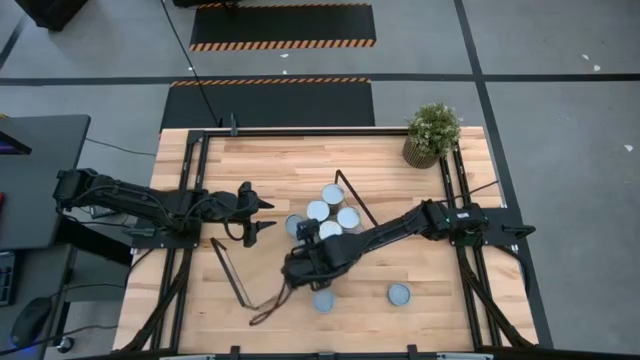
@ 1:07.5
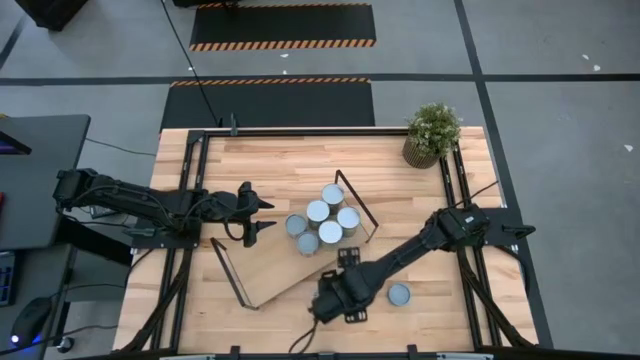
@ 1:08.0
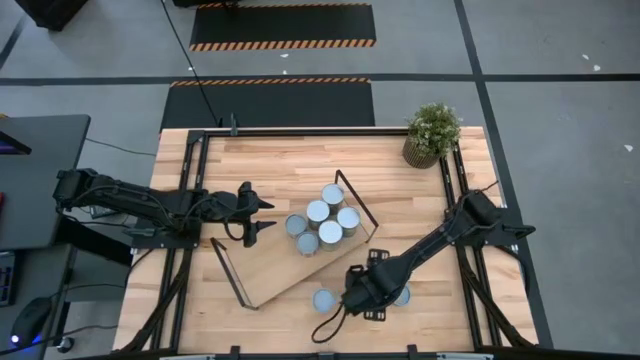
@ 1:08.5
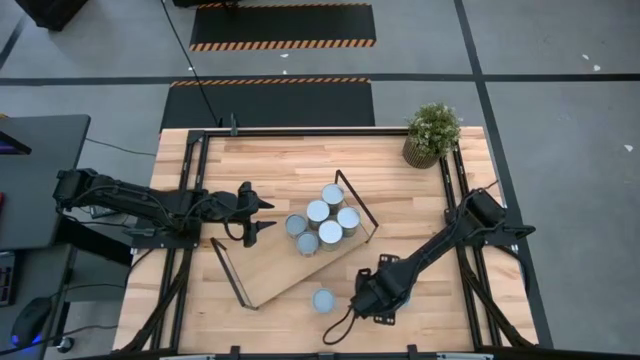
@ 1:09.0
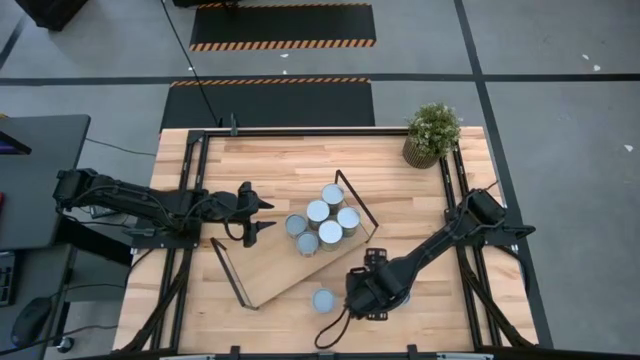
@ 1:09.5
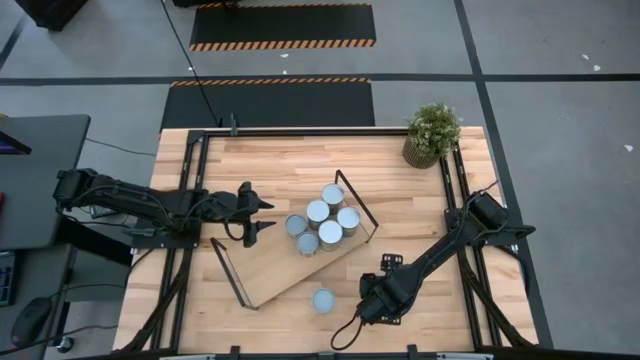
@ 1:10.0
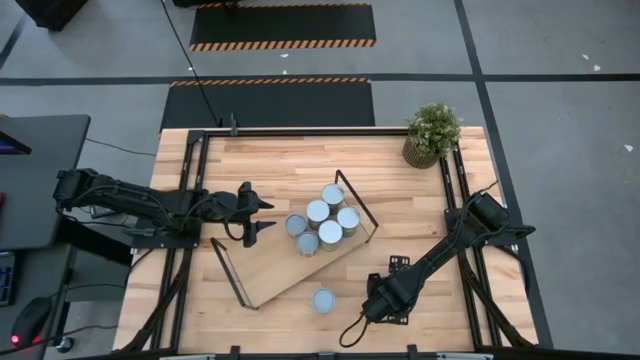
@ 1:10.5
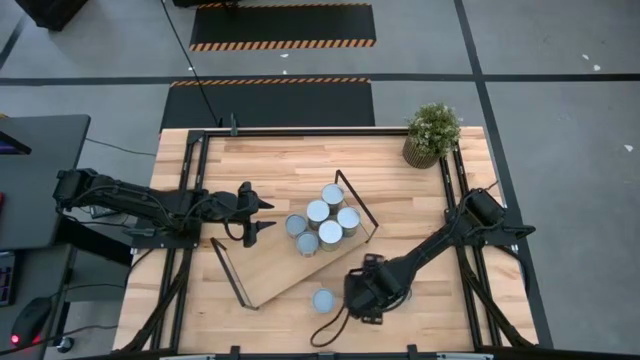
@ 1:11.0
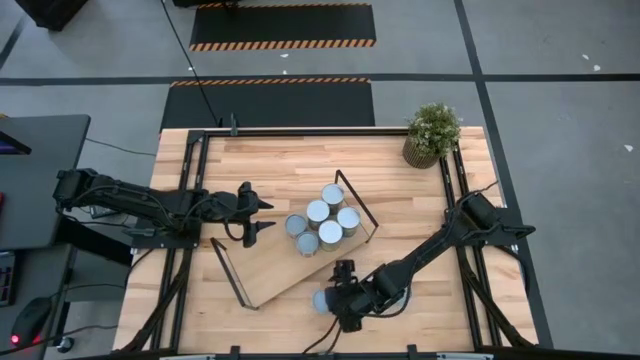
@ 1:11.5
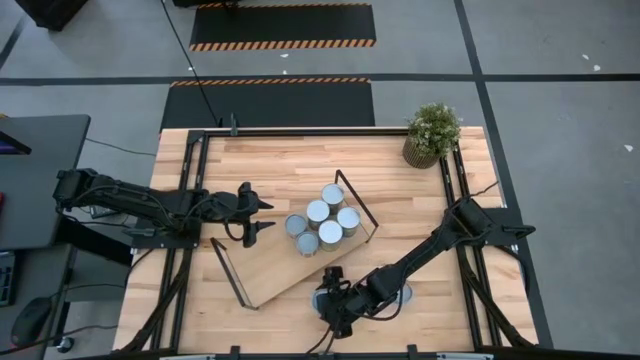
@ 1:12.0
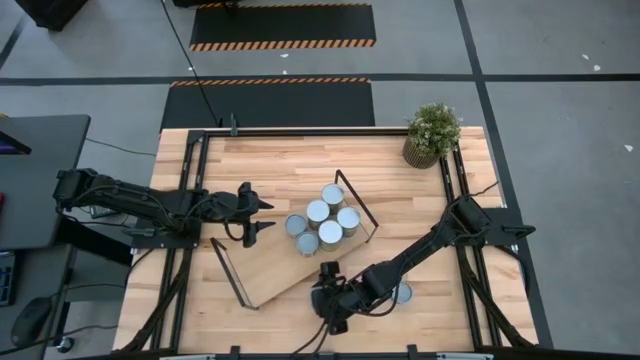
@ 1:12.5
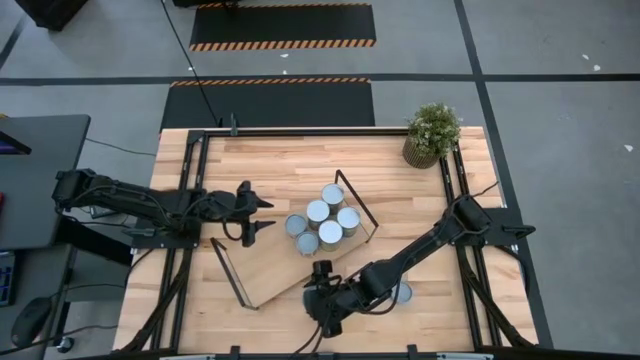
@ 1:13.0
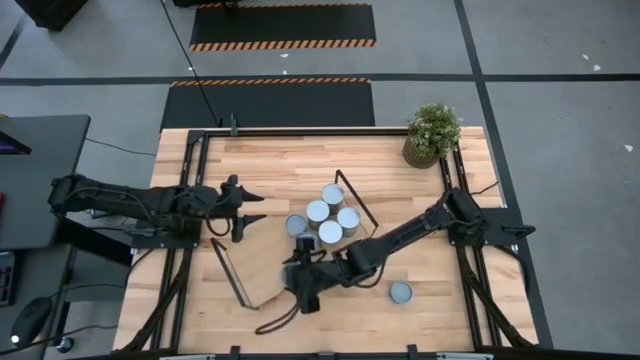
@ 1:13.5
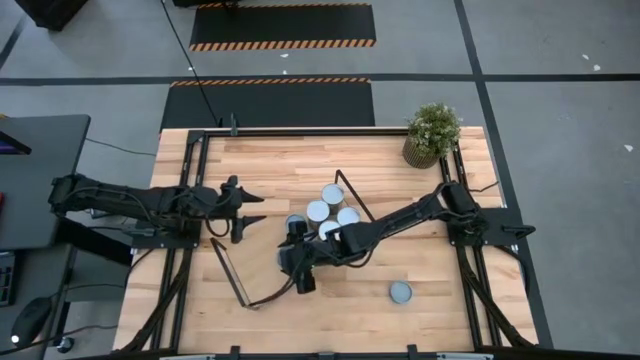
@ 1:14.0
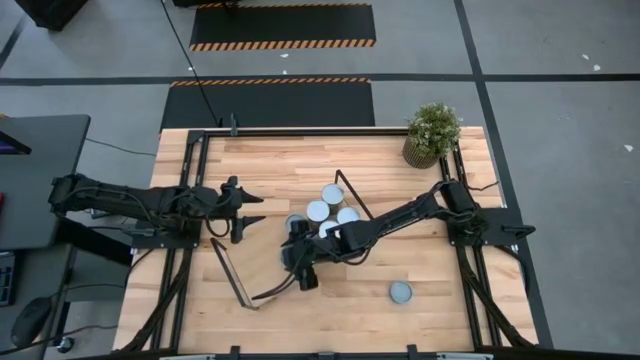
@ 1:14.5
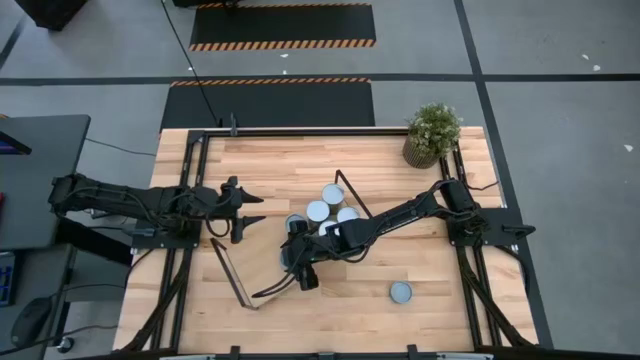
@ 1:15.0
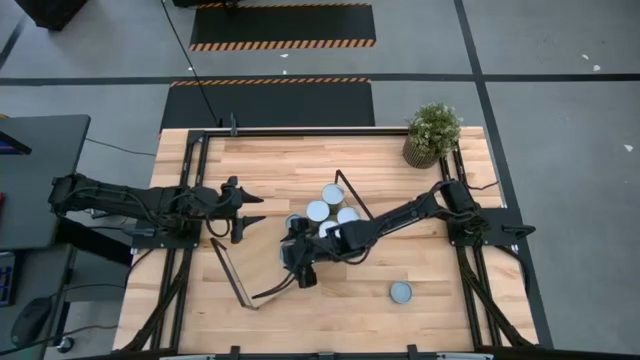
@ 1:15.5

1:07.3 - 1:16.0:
Task: Pick and place cans onto a shelf
Put the left small can on the shelf

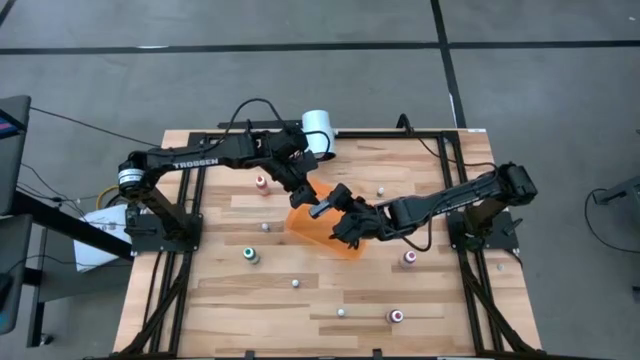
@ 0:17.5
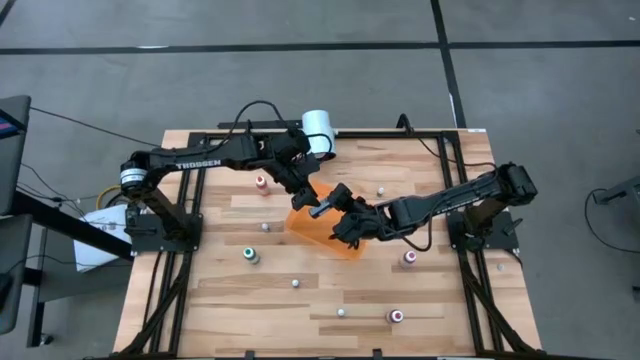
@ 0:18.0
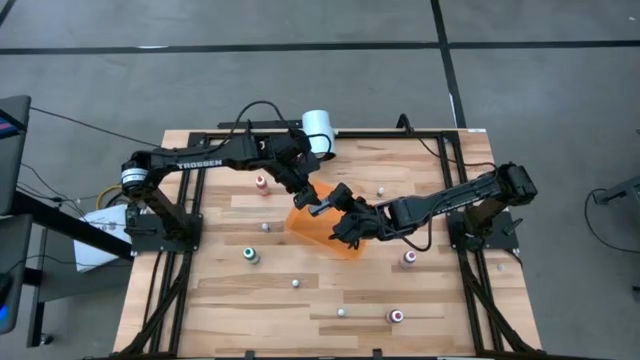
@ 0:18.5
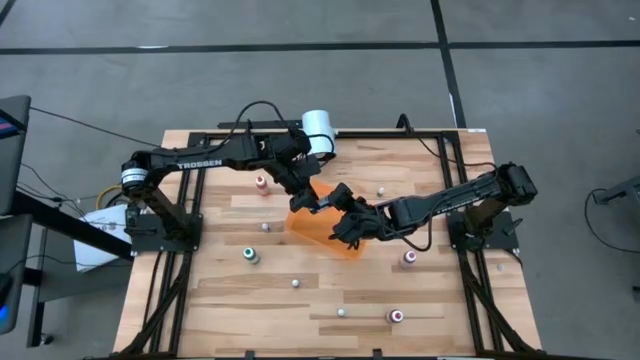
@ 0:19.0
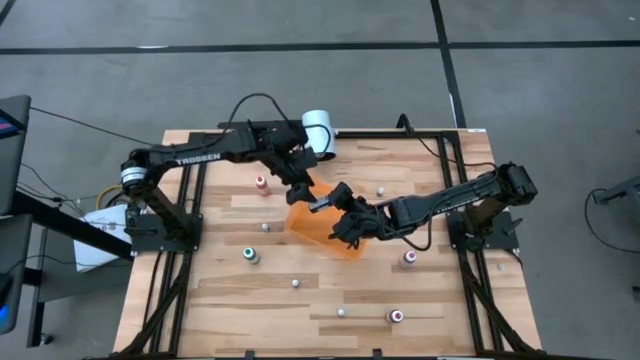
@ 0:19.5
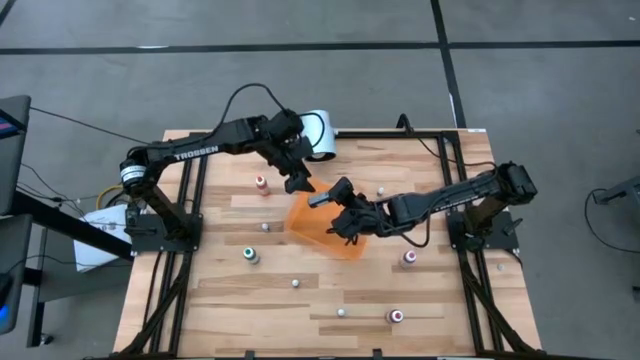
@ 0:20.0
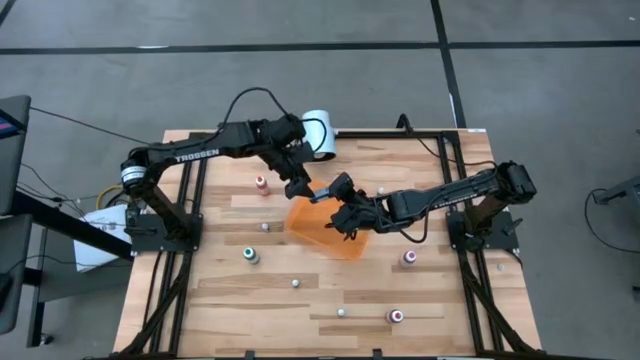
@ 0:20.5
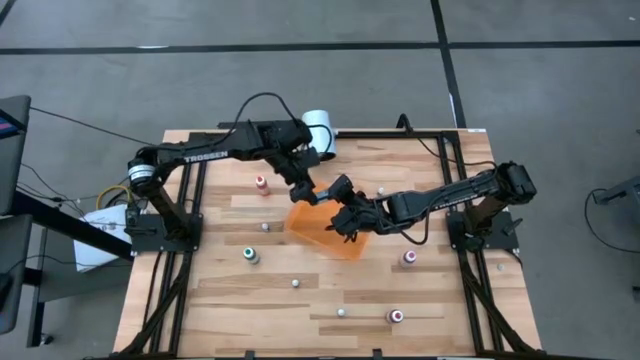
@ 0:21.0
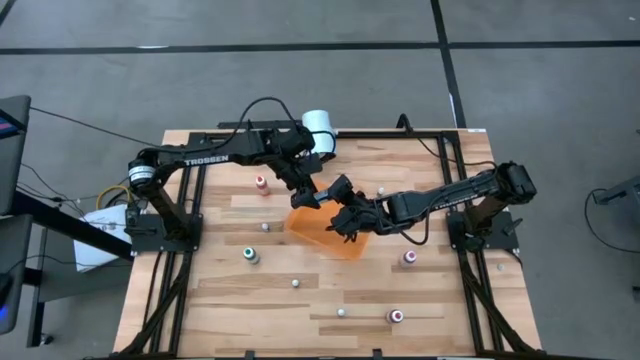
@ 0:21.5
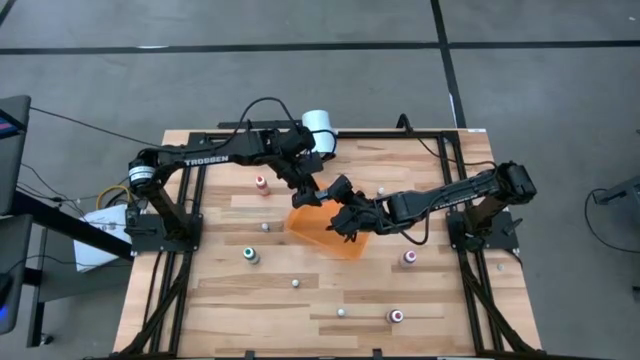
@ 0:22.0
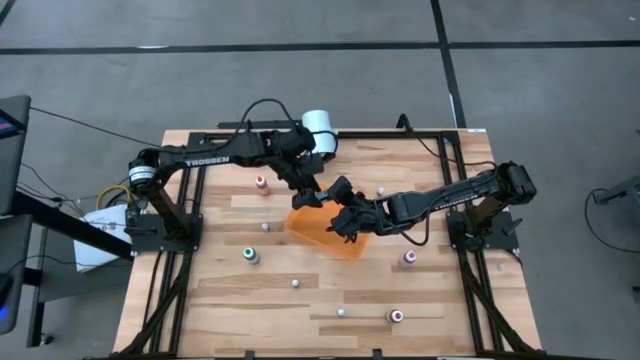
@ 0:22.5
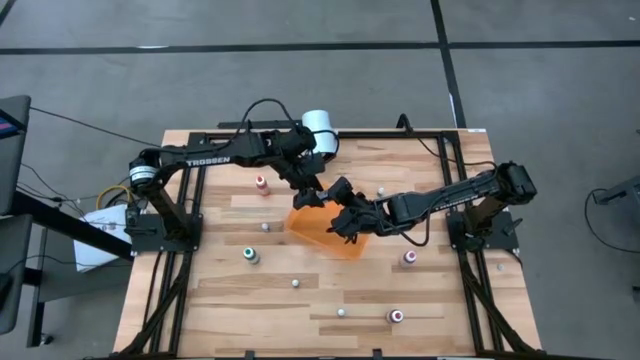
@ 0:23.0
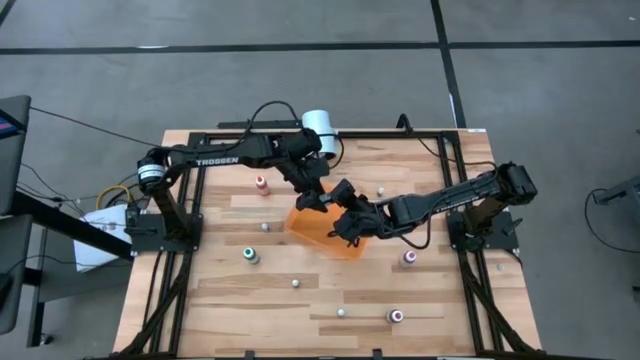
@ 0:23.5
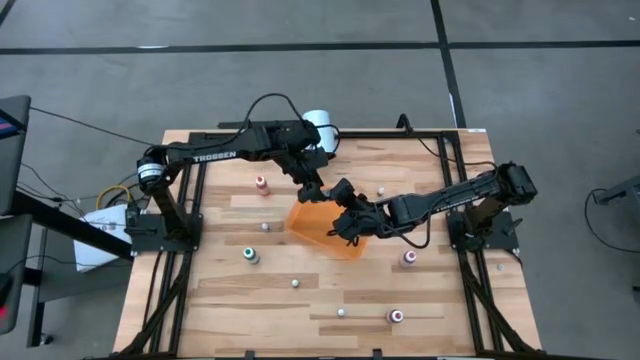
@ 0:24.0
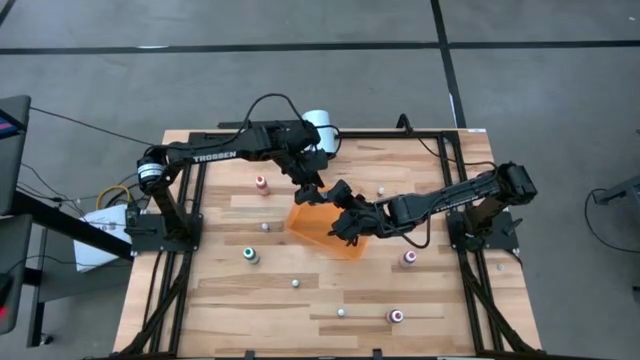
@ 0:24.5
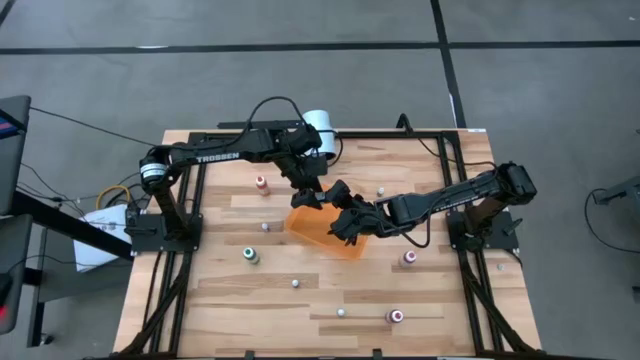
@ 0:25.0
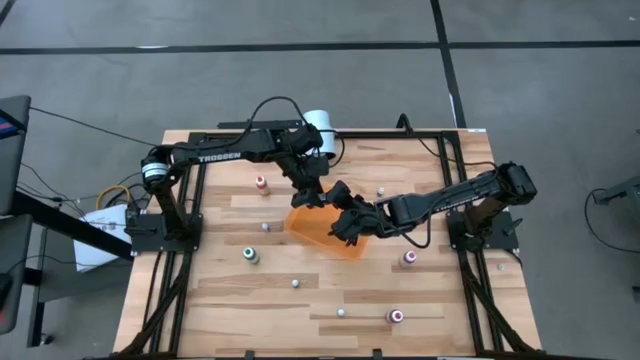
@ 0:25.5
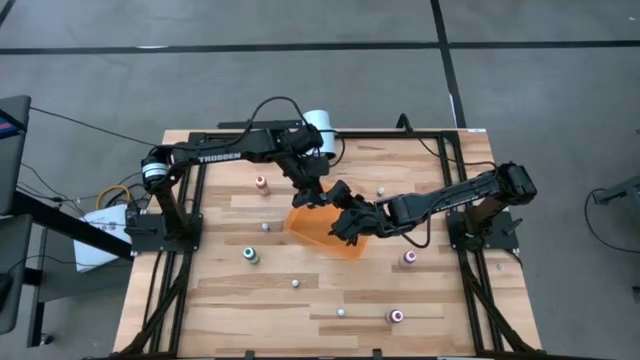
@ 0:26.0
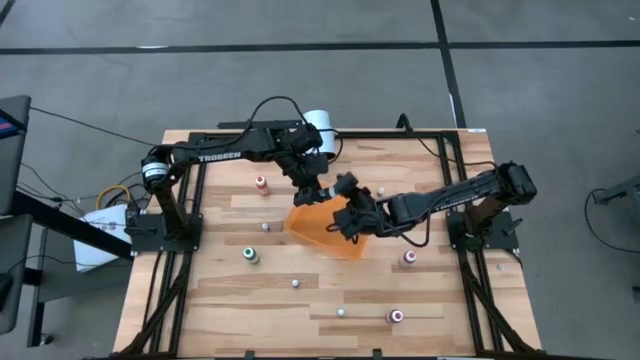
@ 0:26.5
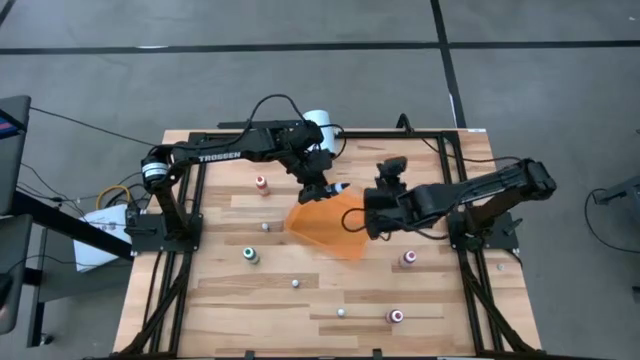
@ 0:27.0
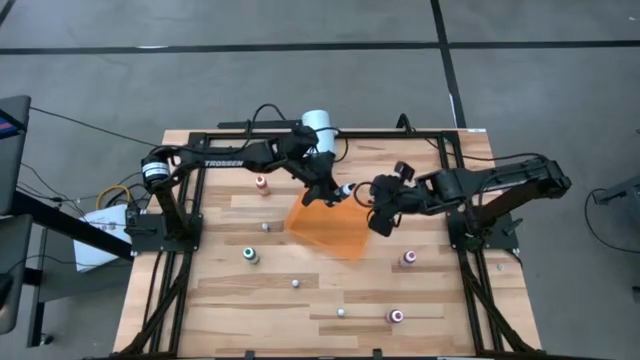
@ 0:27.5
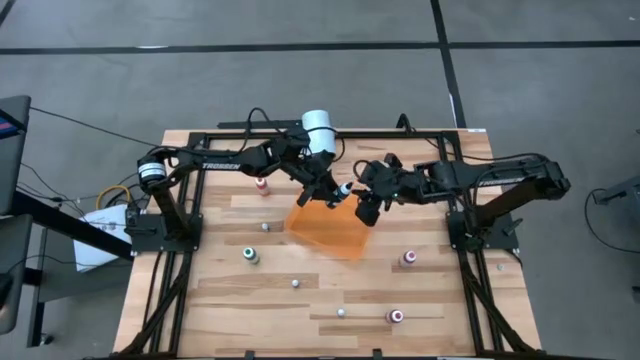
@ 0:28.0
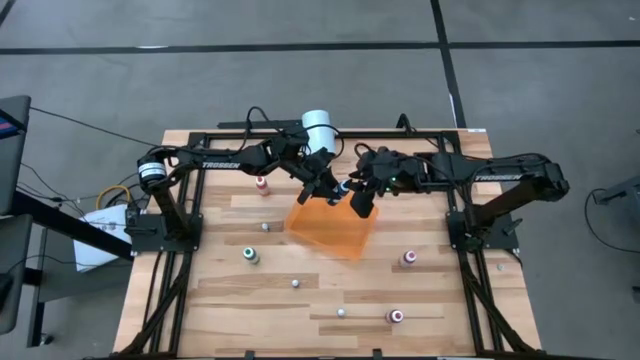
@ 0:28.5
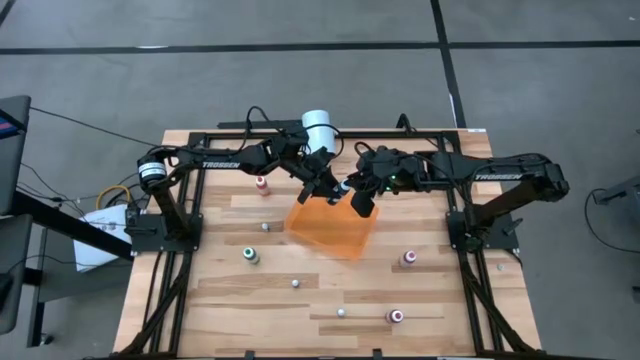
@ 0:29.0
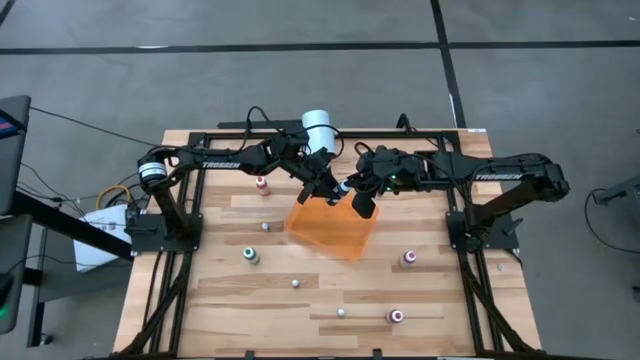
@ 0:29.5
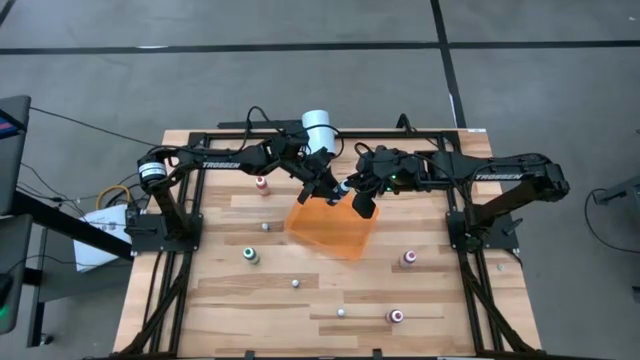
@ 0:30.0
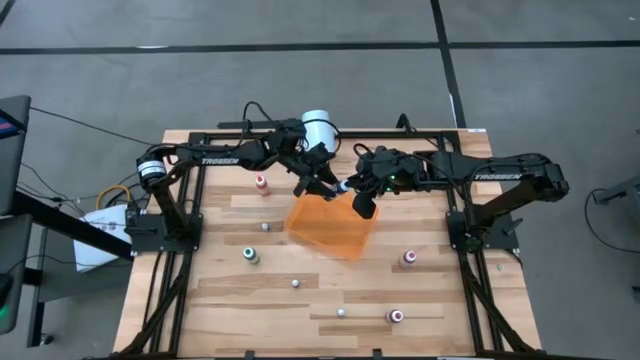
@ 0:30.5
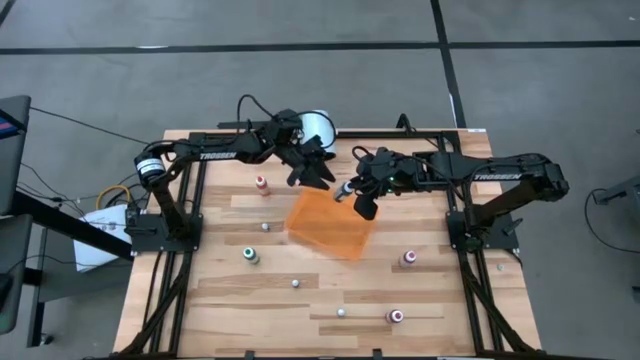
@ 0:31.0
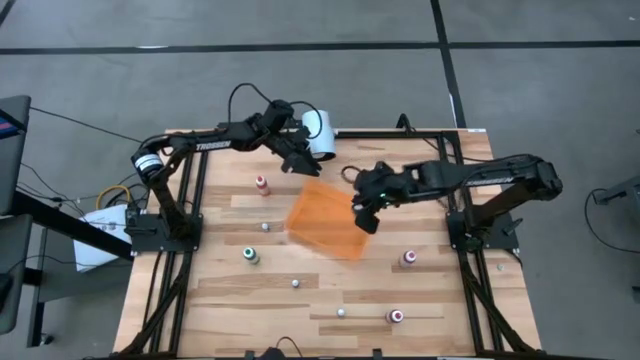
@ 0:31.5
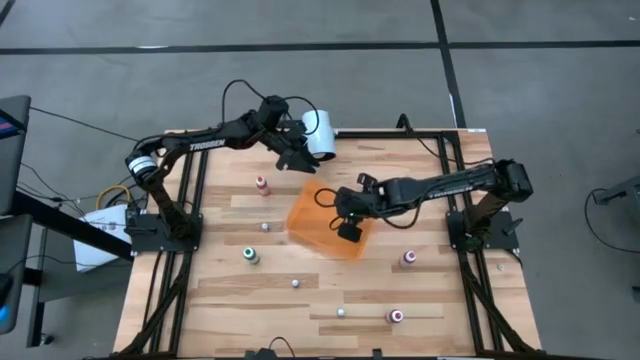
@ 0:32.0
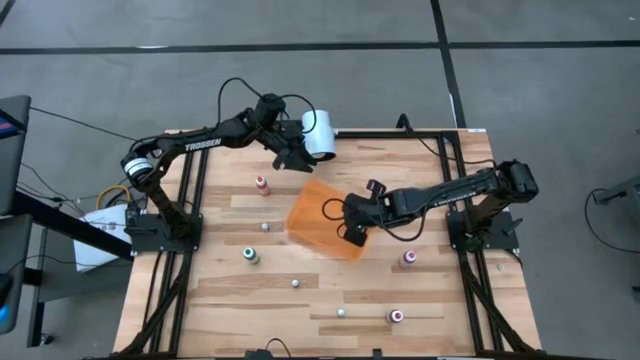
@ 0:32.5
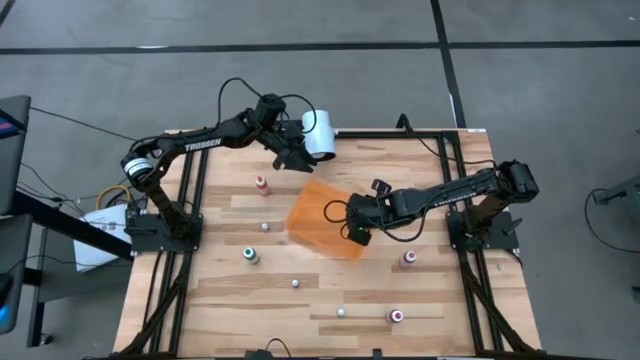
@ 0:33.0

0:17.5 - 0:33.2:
Task: Pick & Place food coloring
Put the large black food coloring bottle into the bin
